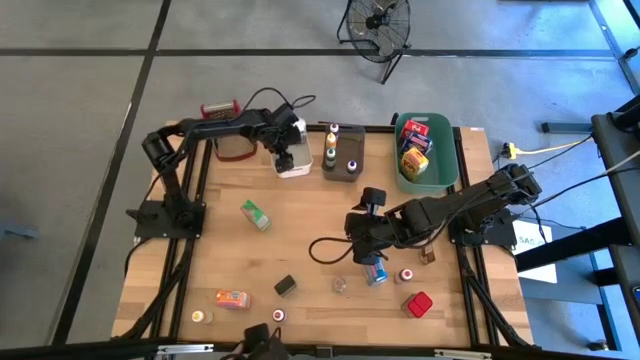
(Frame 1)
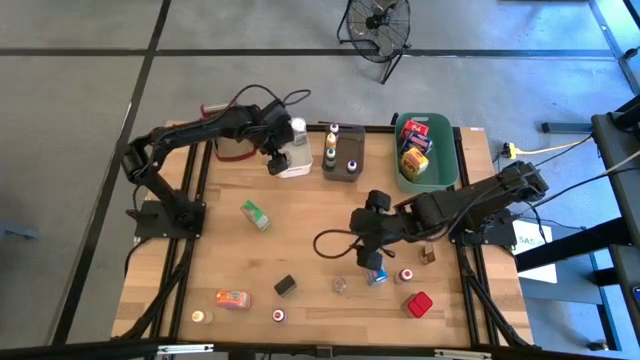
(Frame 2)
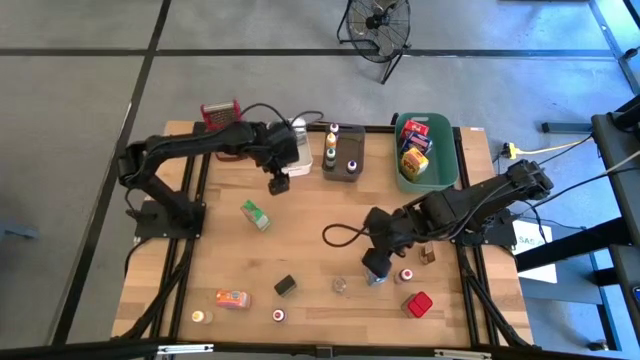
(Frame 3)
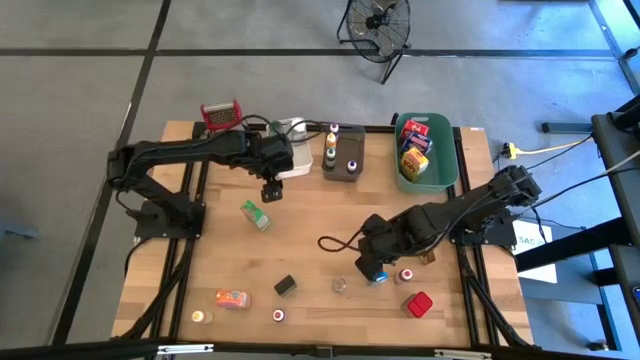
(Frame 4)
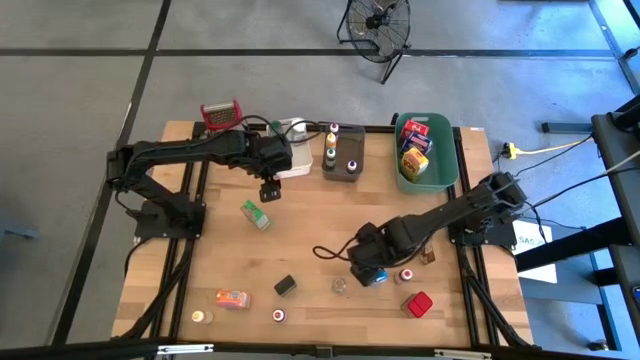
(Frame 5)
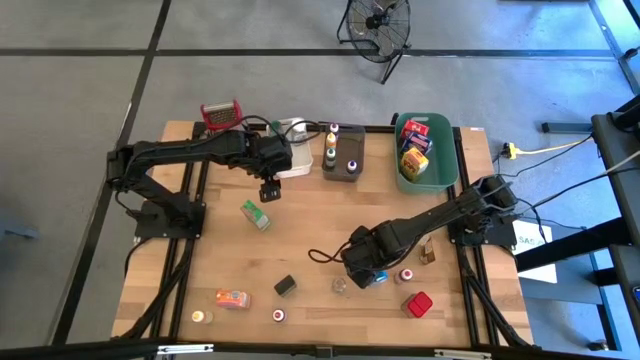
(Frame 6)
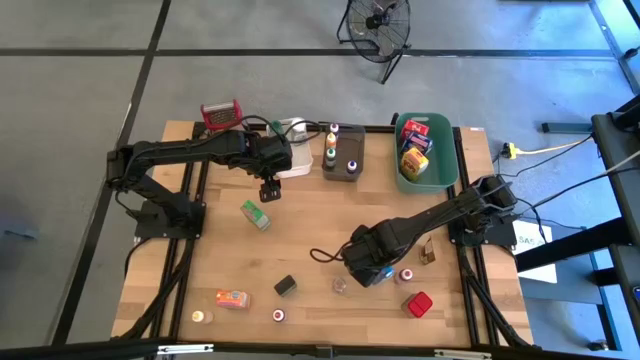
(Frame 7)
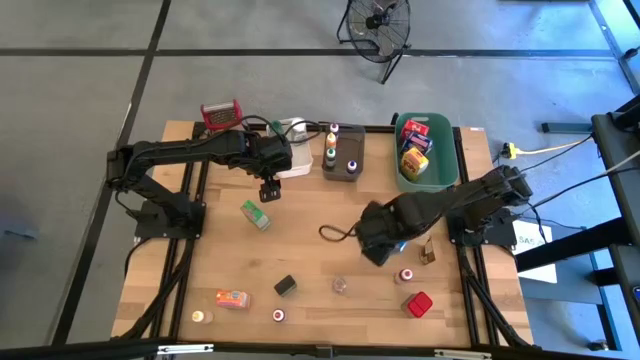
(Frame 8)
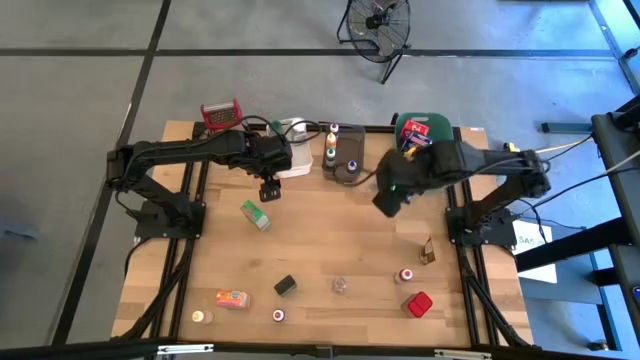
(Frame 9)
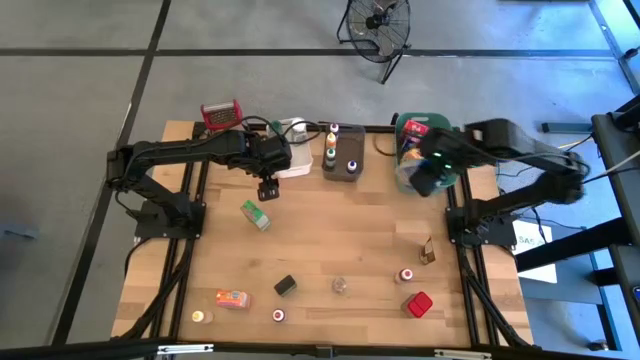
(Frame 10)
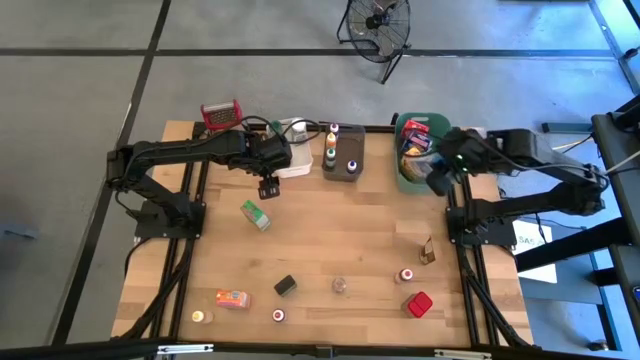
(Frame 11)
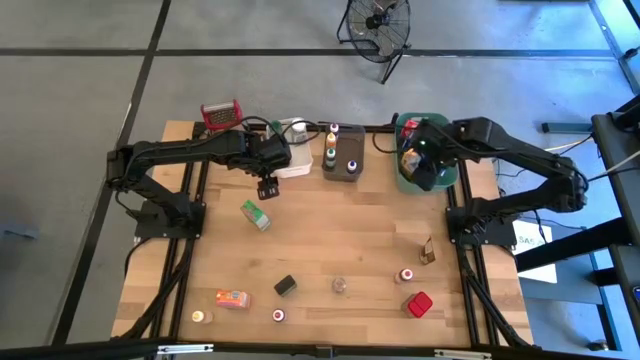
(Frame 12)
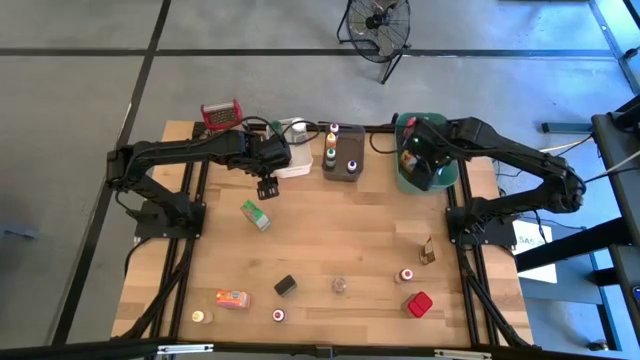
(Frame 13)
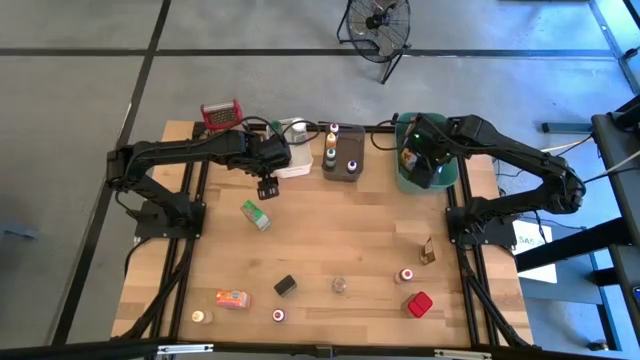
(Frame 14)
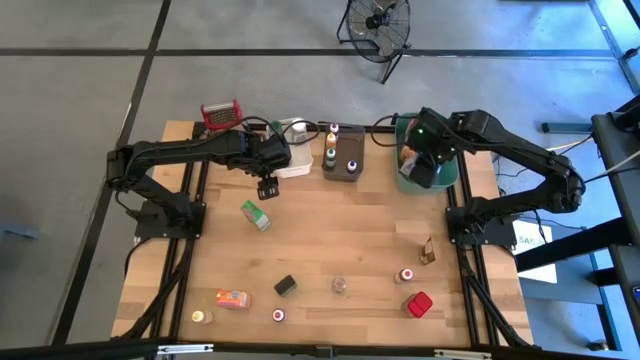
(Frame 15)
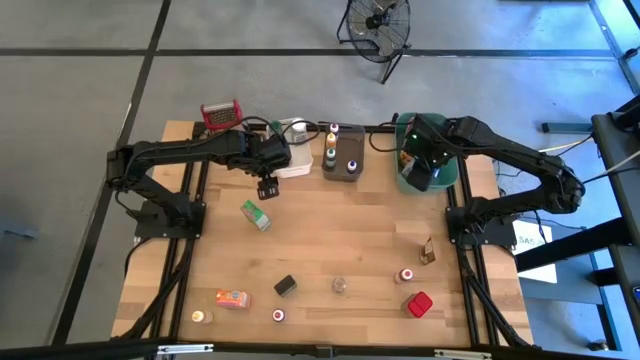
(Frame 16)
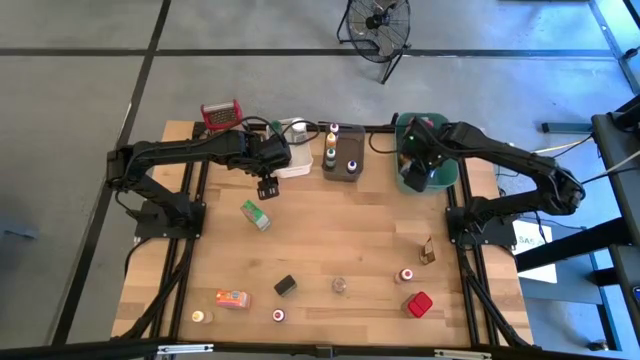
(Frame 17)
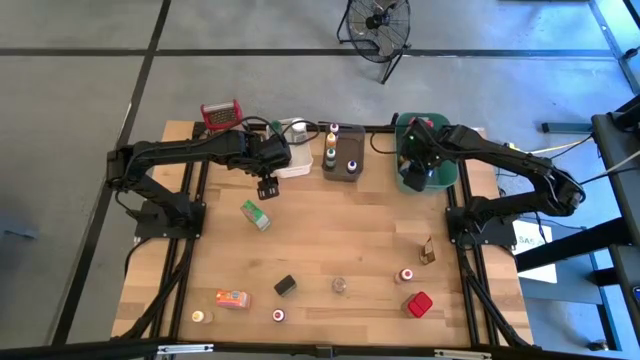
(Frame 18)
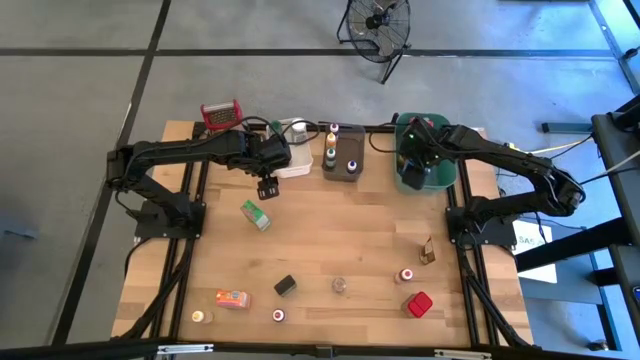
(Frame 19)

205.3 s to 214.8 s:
Task: Pick & Place Kitchen Items
Put the light blue cereal box into the green bin

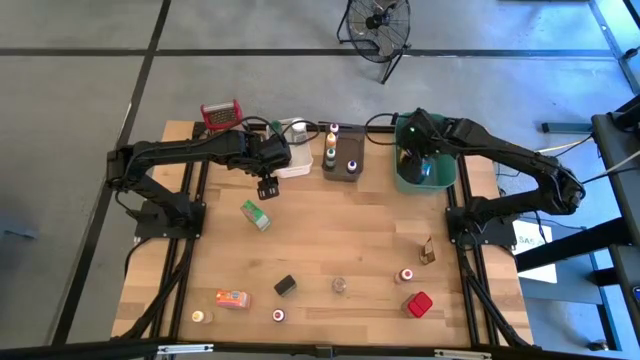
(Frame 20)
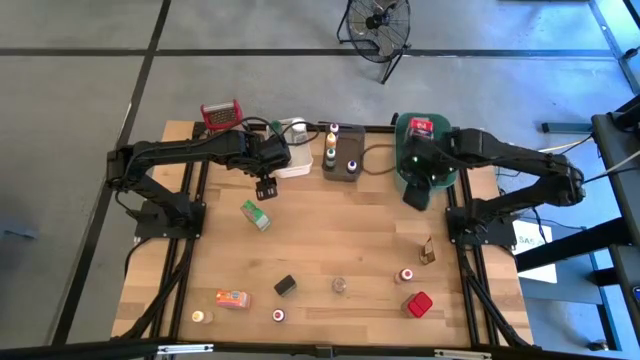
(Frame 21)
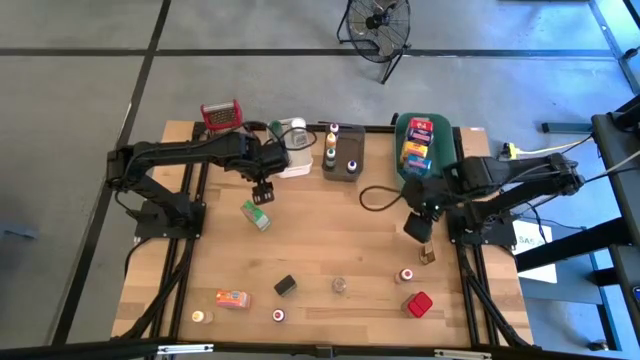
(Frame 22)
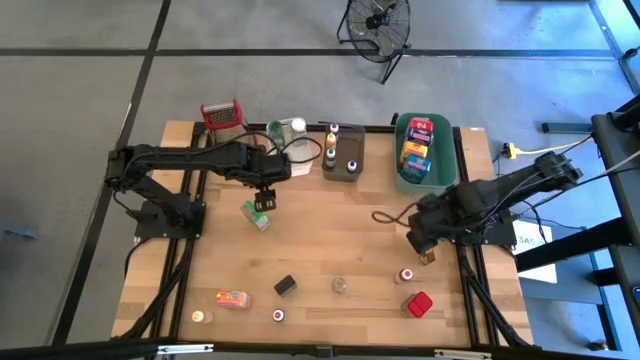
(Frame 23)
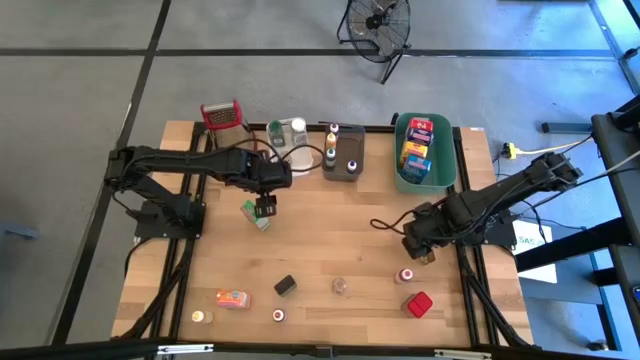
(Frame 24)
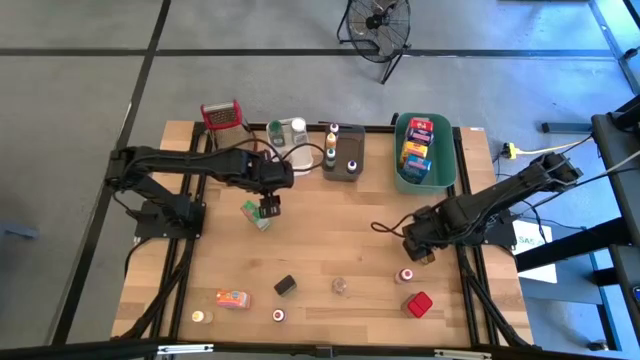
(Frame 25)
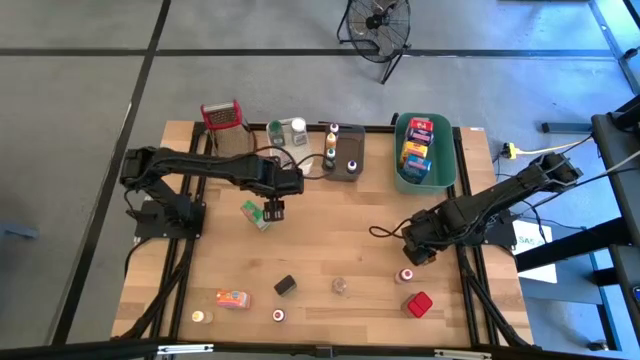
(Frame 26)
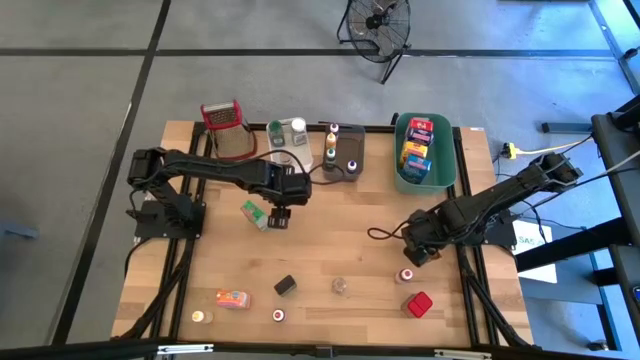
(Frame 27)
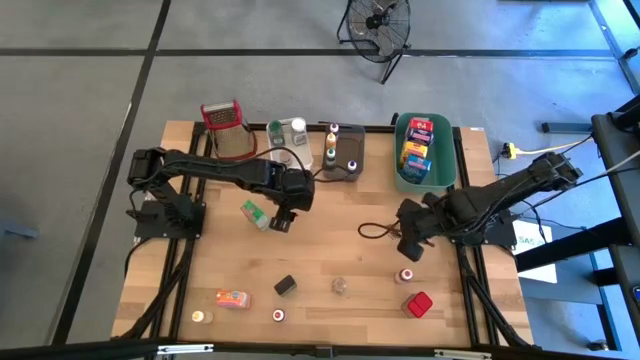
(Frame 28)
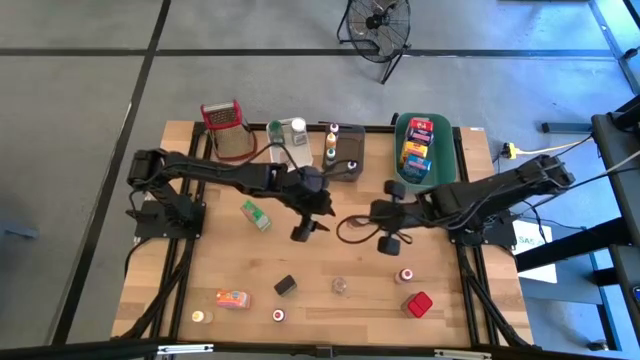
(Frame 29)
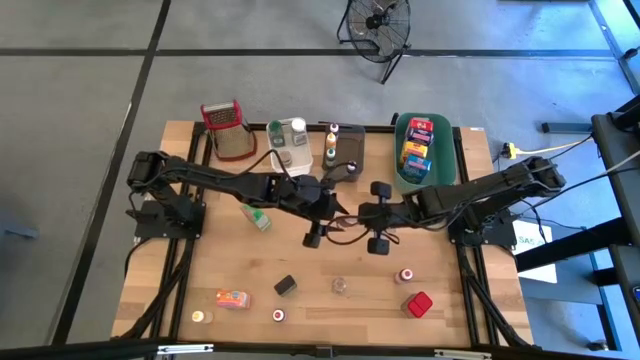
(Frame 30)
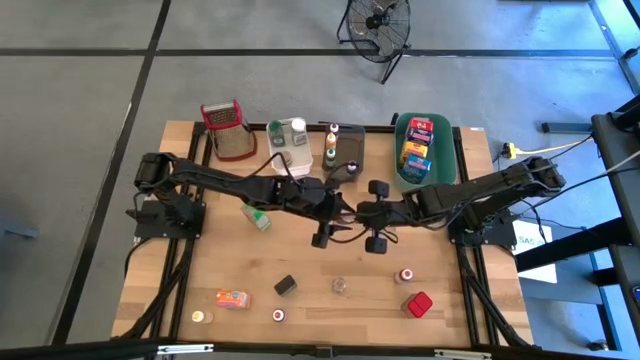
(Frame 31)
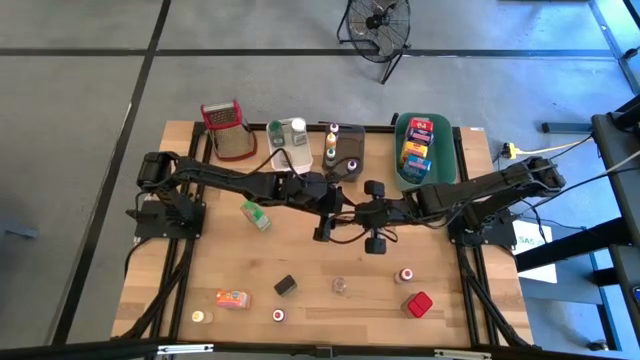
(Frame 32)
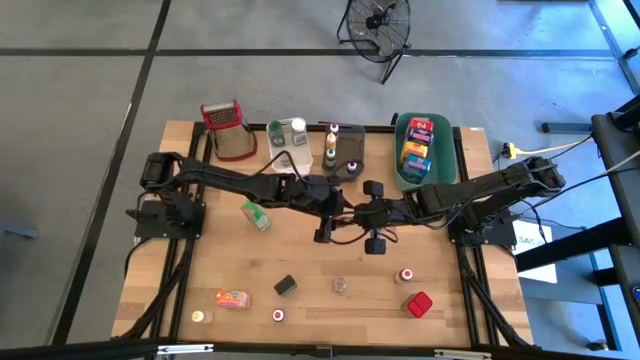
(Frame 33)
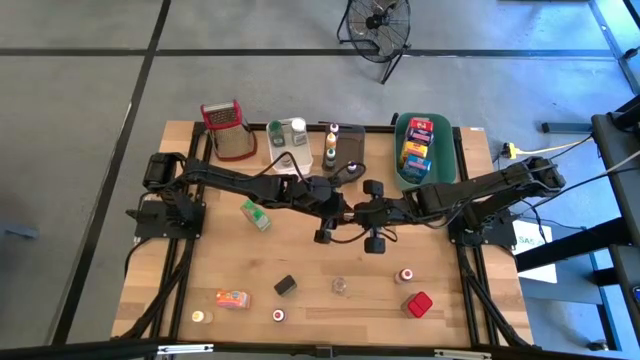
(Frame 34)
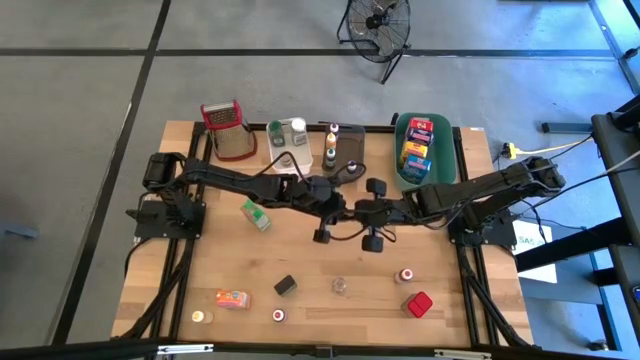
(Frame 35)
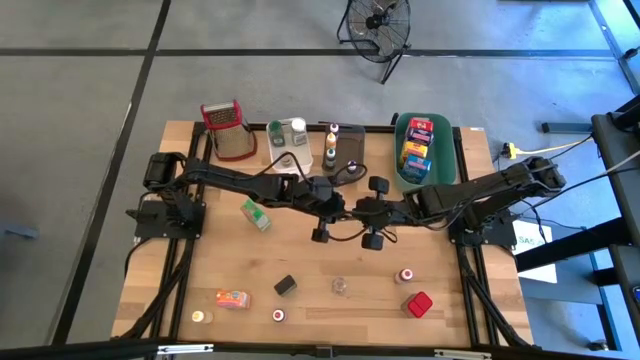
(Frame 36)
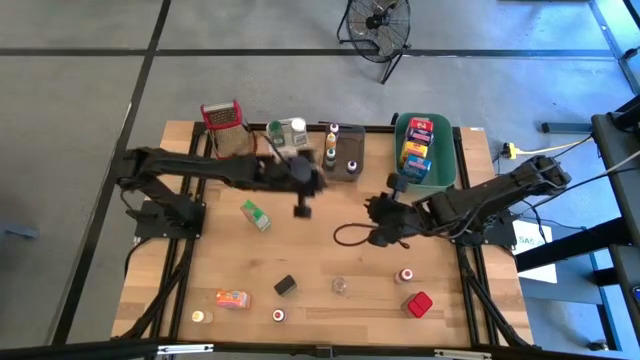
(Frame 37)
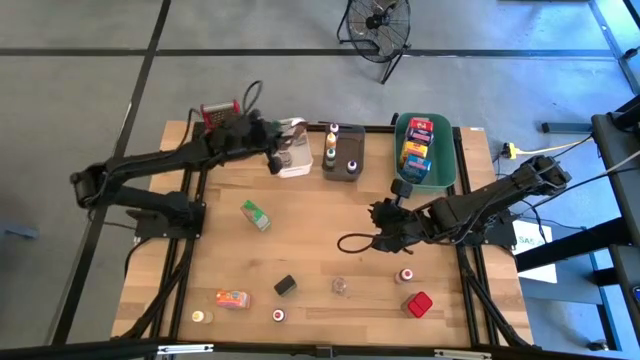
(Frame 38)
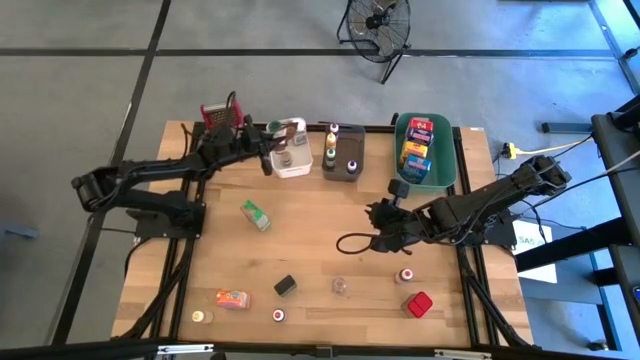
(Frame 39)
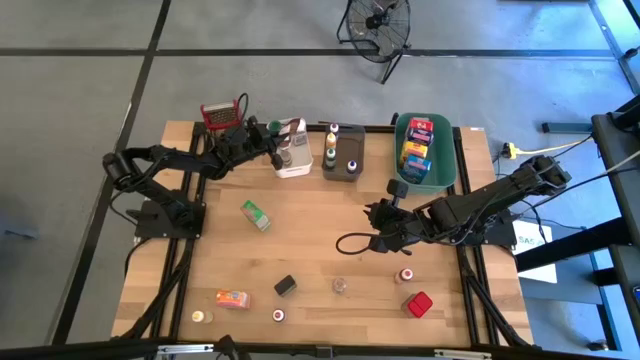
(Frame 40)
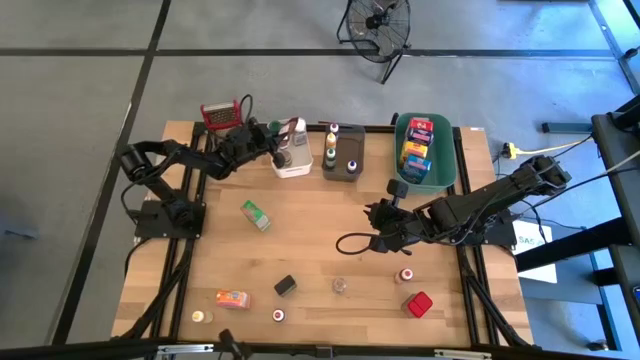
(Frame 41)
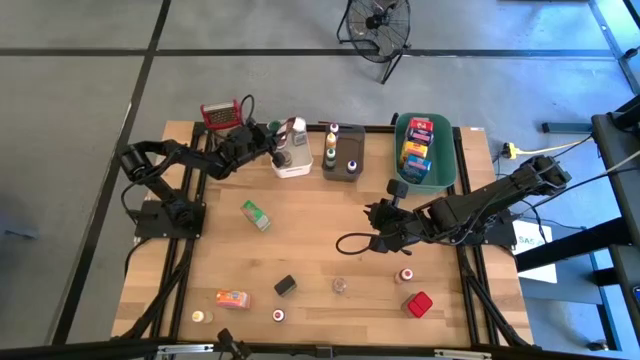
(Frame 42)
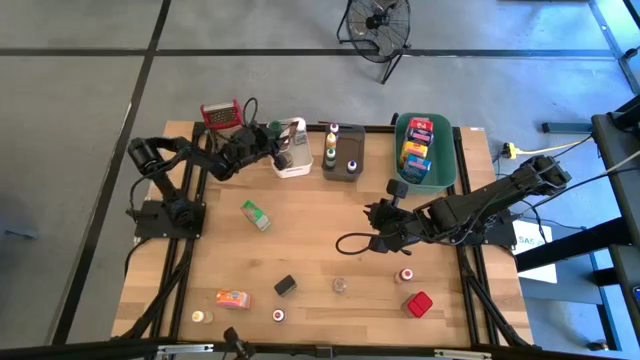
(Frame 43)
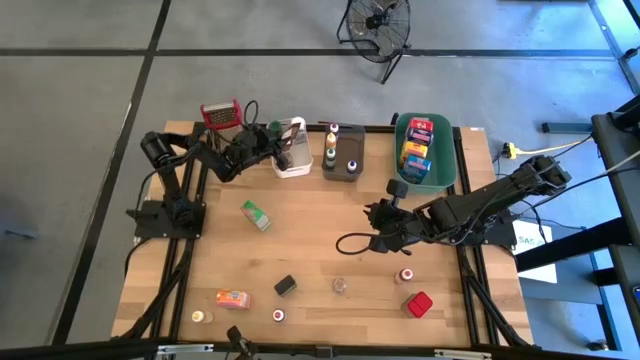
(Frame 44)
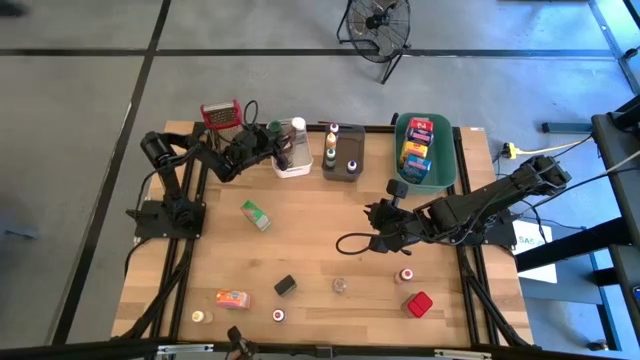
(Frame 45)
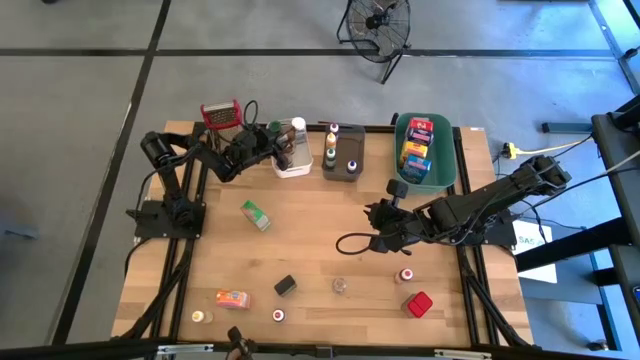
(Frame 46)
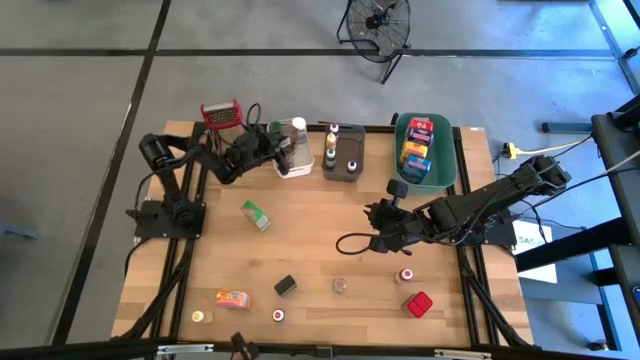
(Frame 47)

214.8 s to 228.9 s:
Put the orange seasoning pack into the white bin
